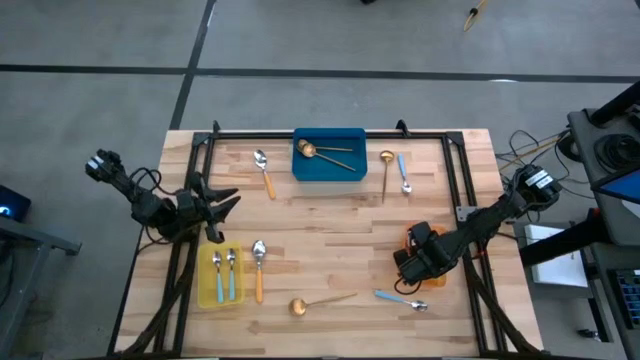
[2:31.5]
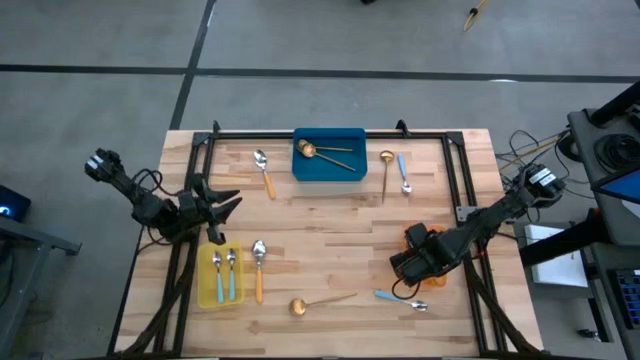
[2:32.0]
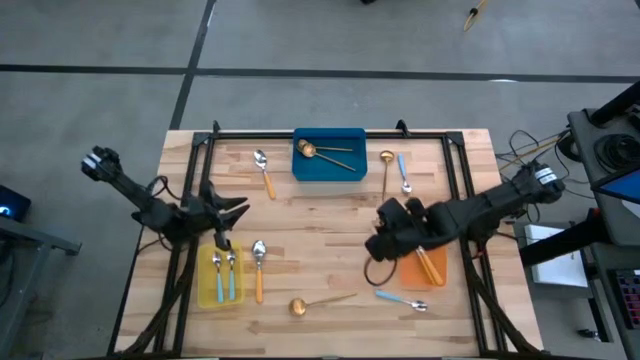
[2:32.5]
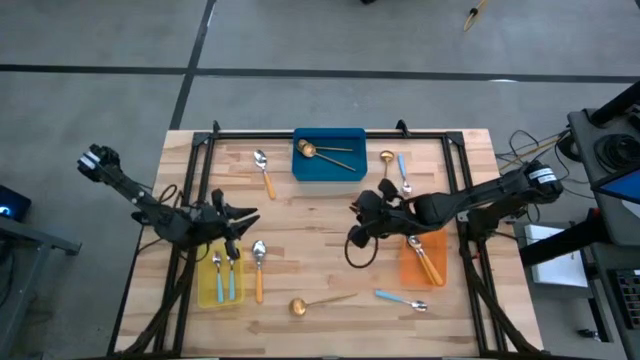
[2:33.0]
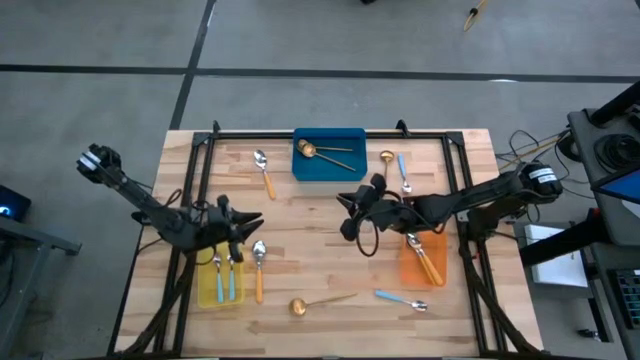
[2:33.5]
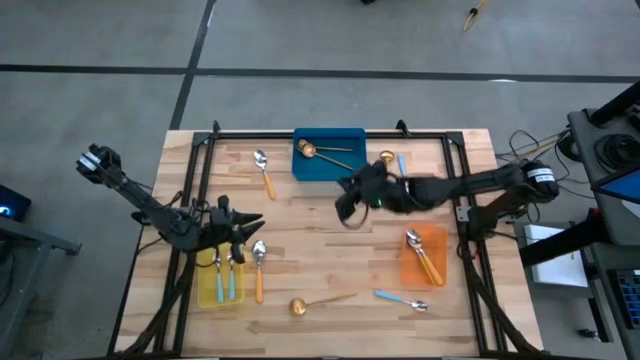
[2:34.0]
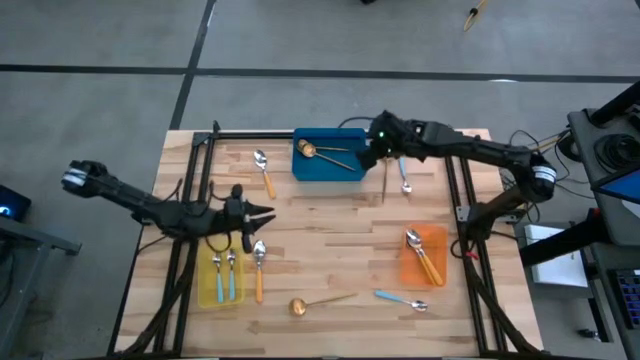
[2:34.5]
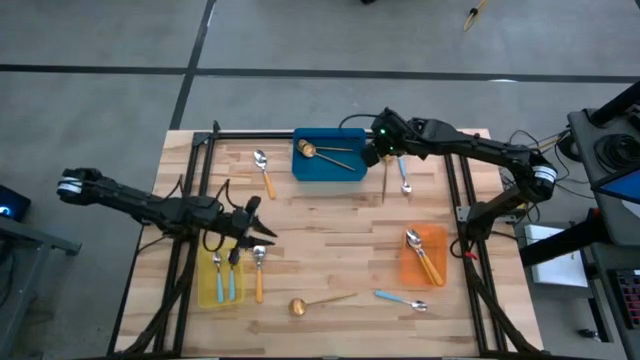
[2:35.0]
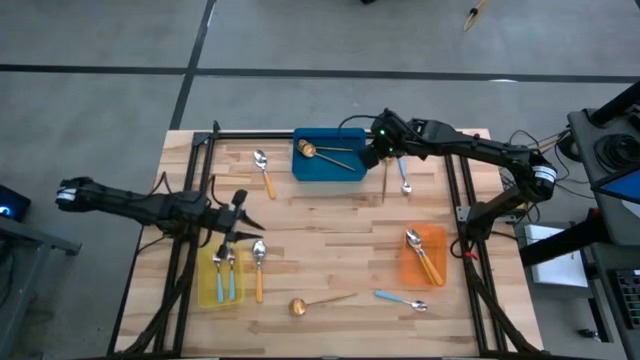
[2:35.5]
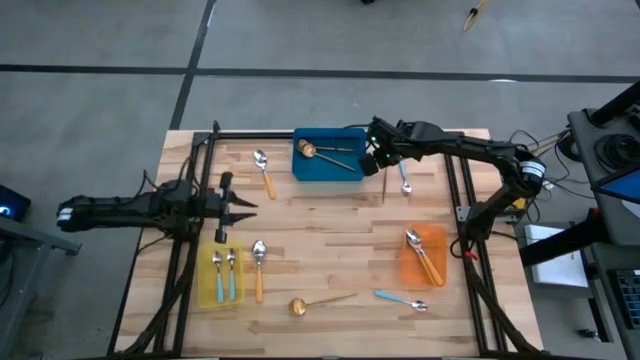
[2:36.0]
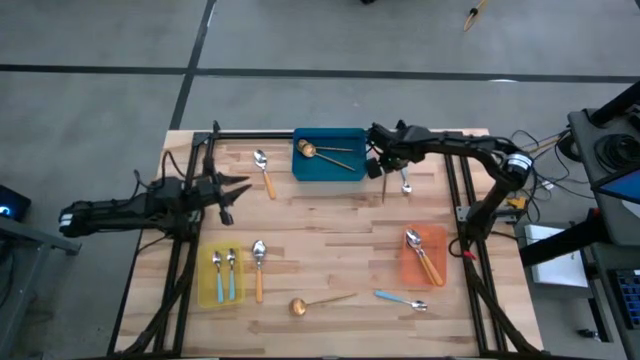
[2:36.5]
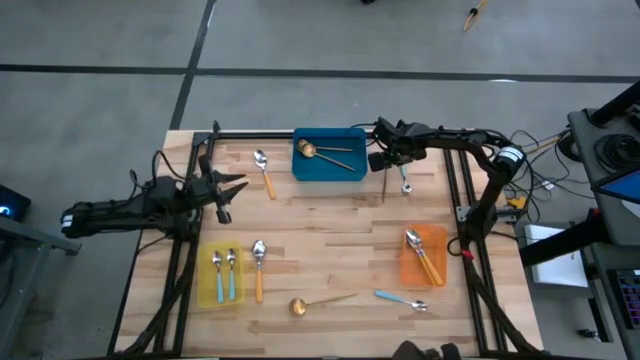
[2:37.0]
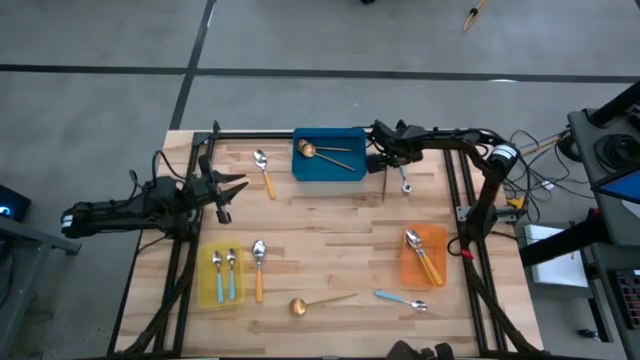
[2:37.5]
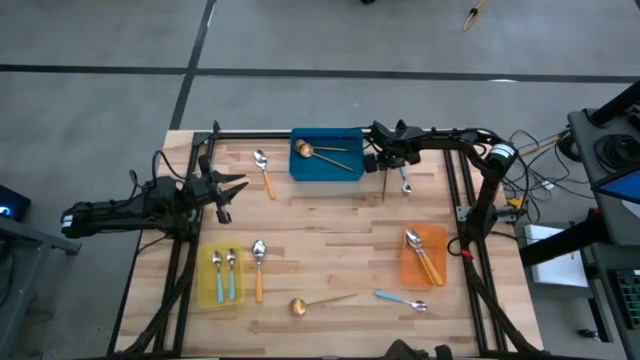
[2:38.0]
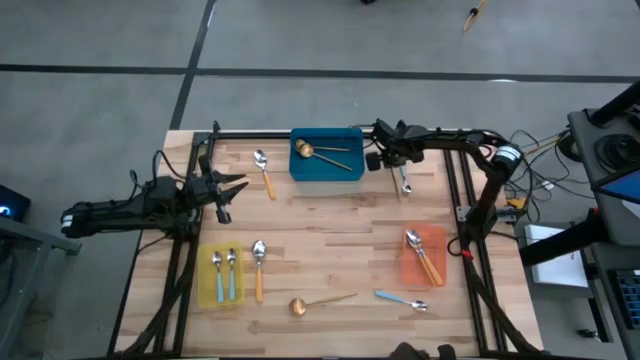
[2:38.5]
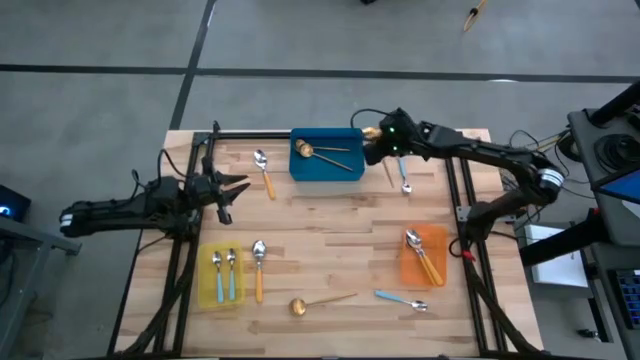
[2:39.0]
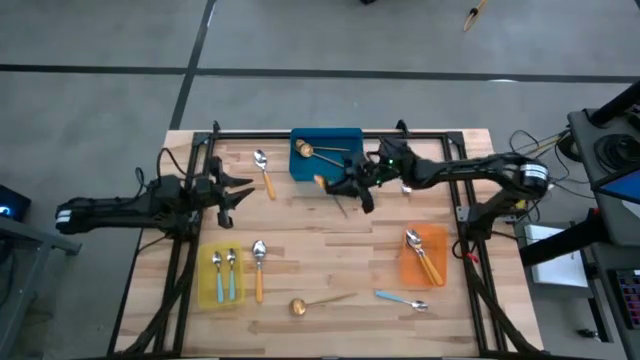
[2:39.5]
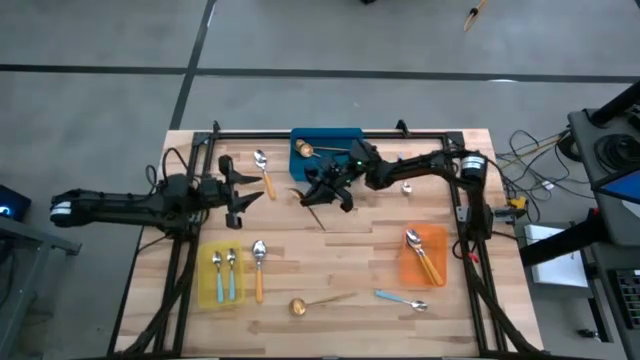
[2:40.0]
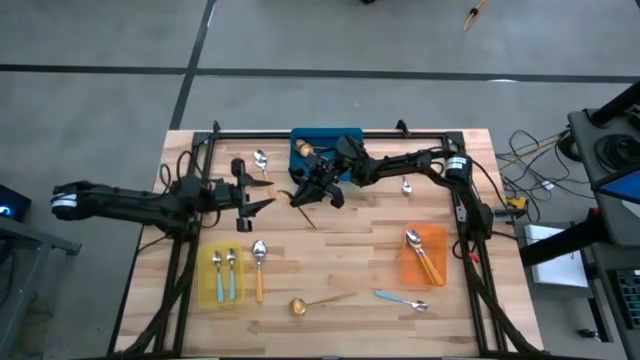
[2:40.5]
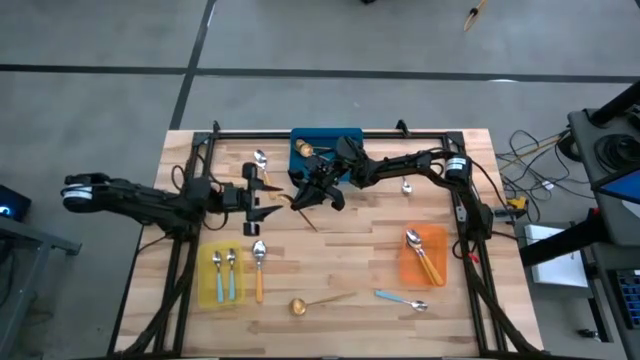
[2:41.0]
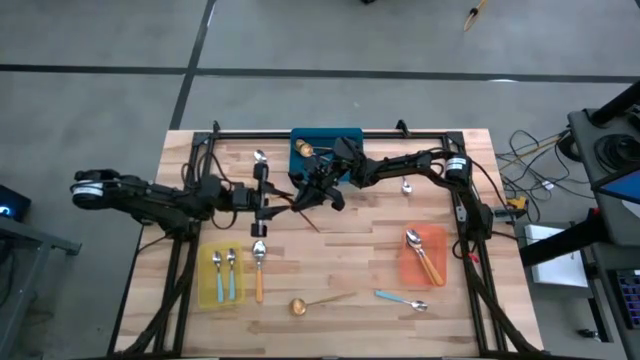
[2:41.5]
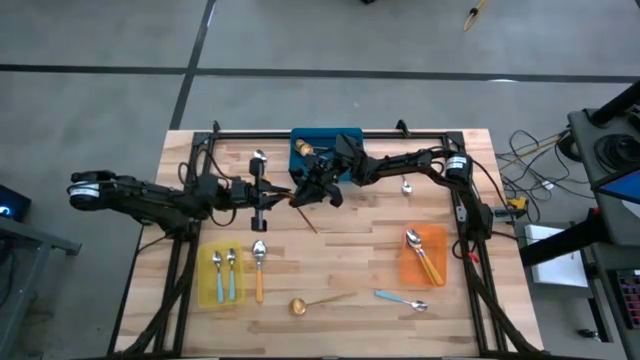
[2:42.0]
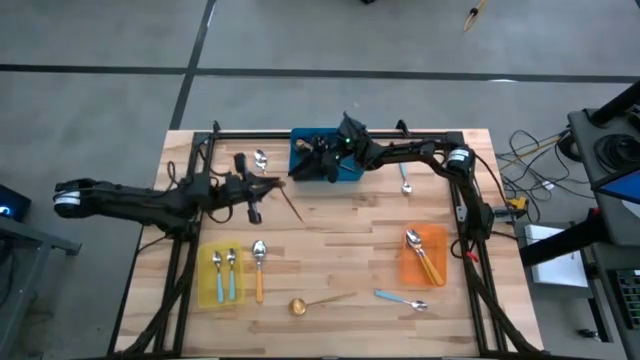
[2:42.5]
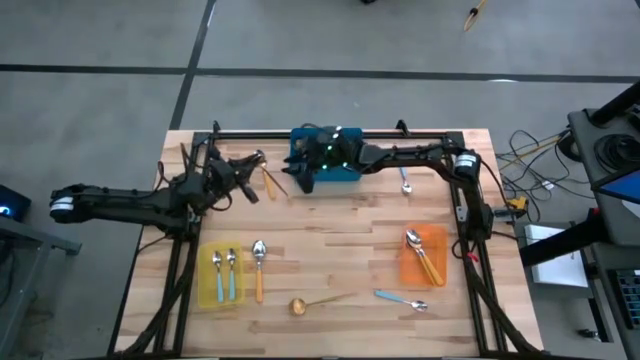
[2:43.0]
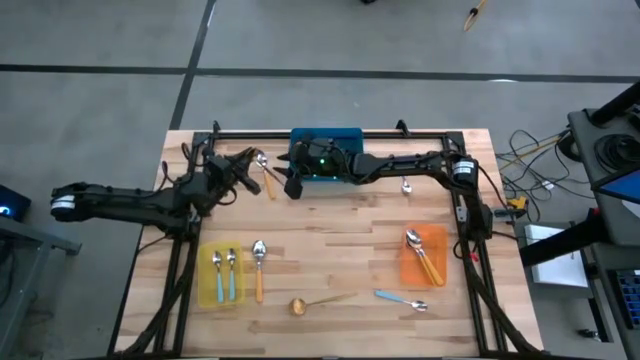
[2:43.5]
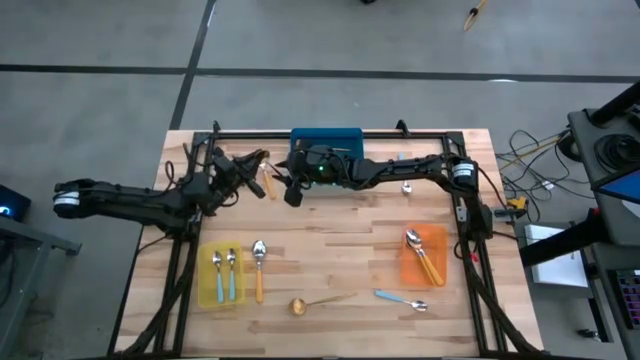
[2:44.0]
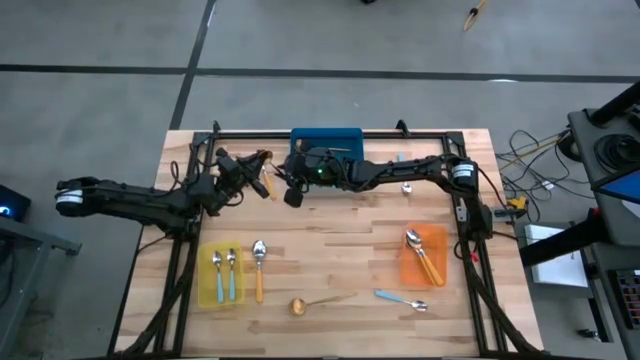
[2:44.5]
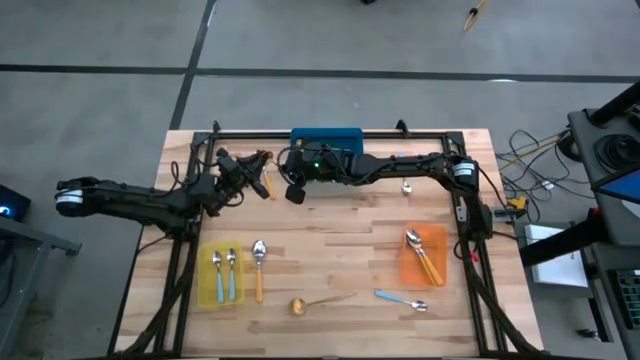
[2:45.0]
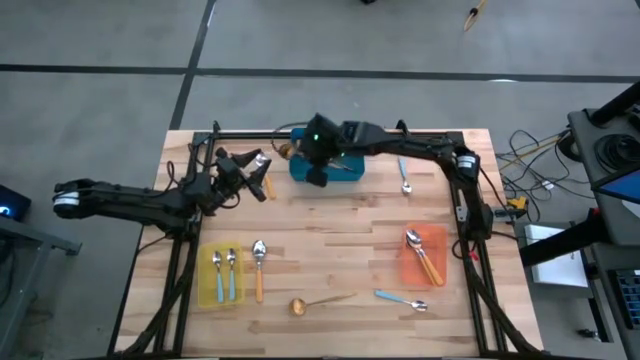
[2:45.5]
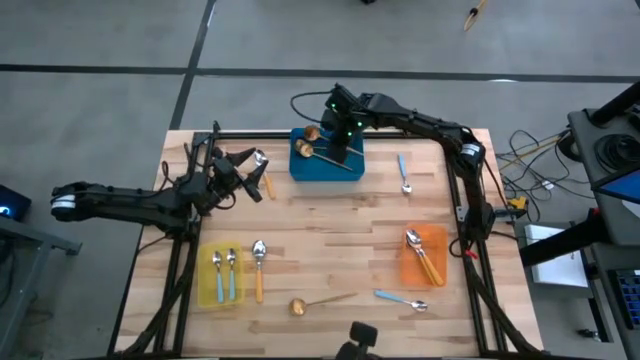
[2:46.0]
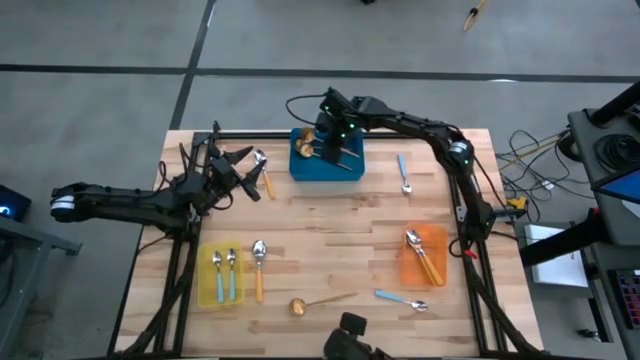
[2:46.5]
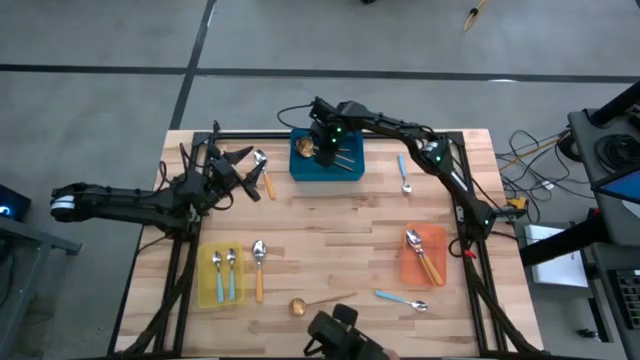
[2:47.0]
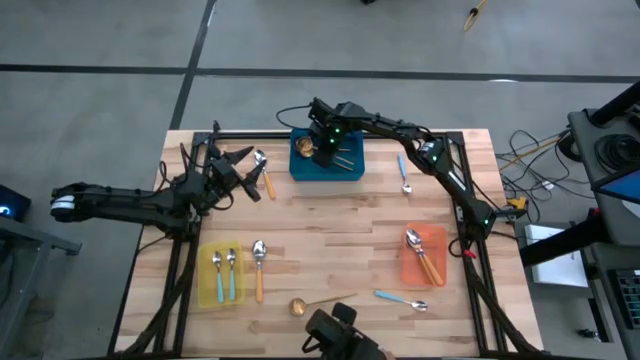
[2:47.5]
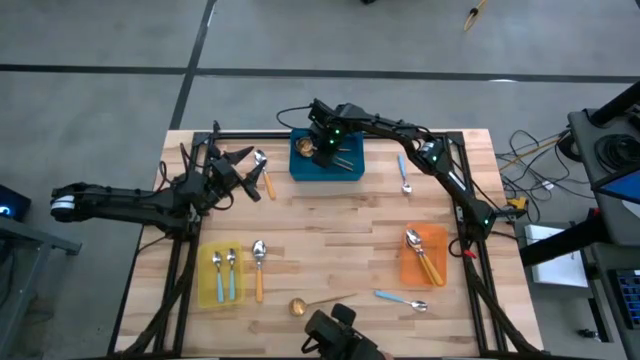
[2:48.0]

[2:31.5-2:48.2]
Task: Sort silverware by color (type)
Put the gold spoon into the blue bin

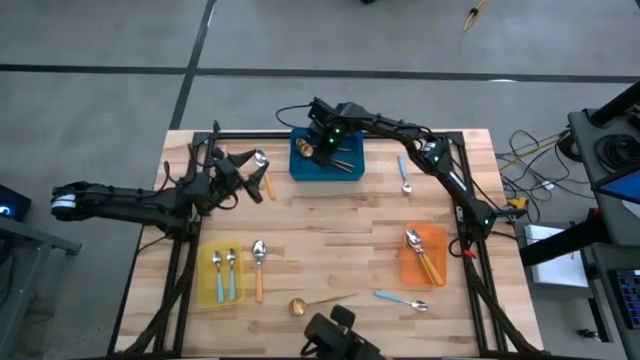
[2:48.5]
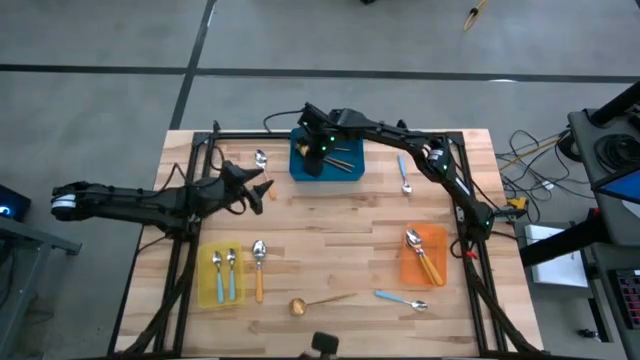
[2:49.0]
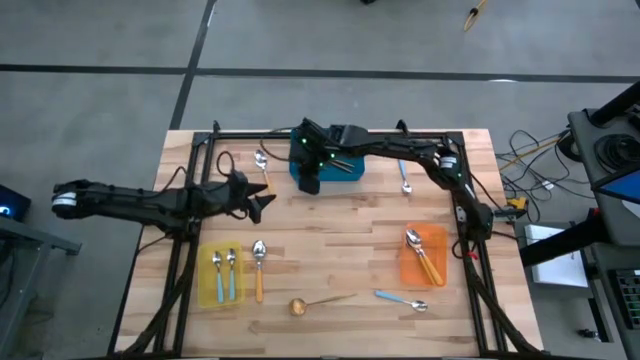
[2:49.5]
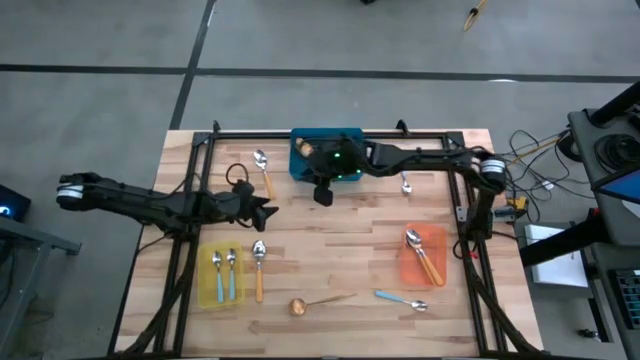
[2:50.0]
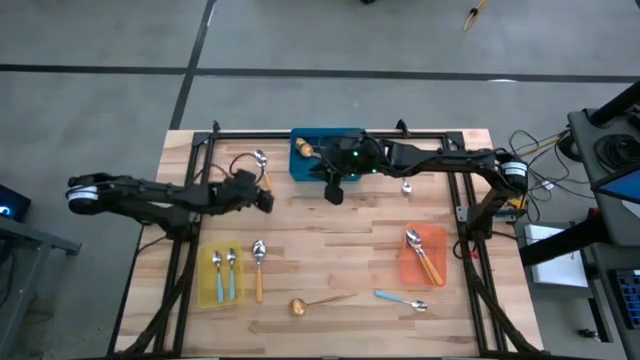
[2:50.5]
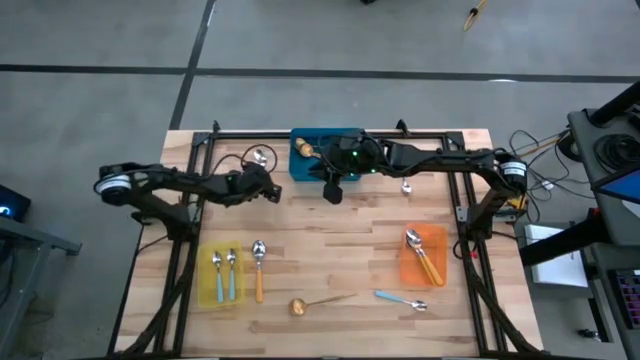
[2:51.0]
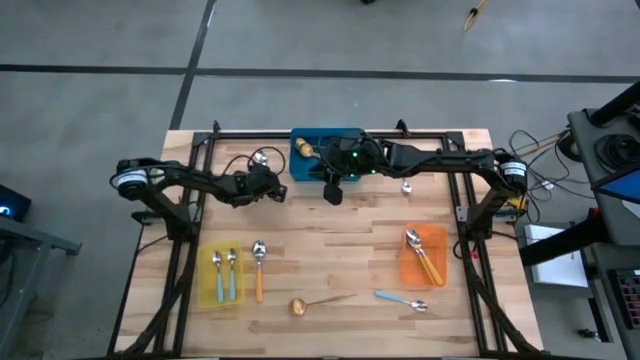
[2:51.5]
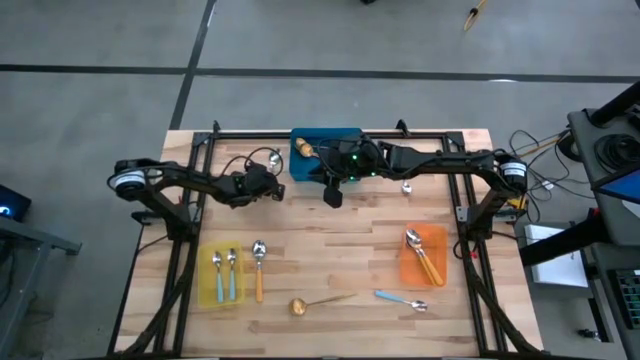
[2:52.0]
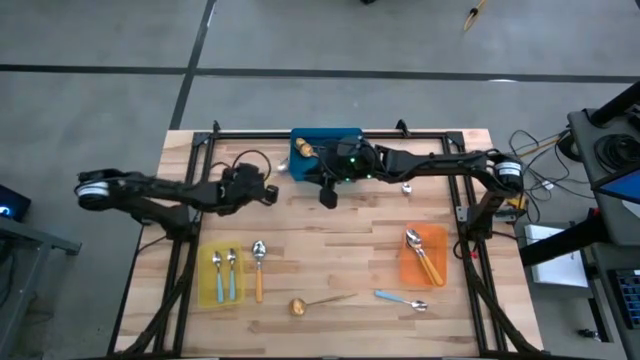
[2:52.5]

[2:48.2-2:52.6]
Put the orange spoon into the orange bin
